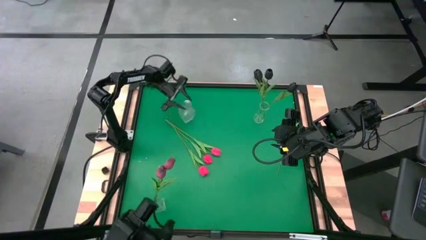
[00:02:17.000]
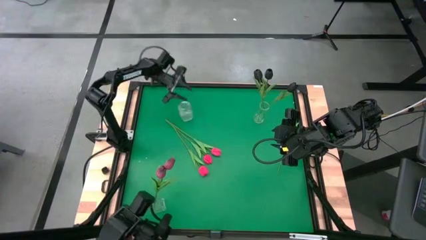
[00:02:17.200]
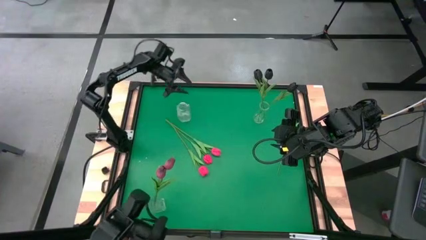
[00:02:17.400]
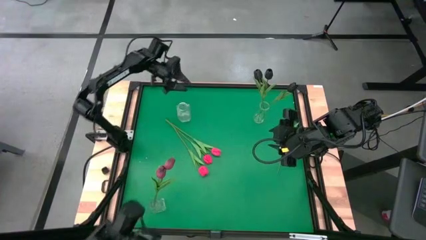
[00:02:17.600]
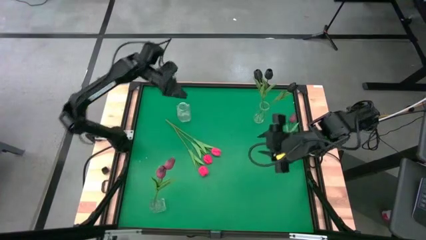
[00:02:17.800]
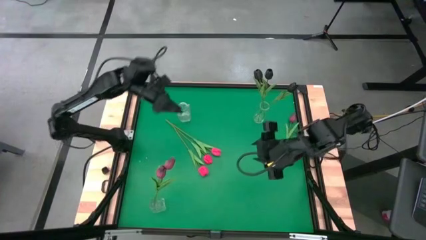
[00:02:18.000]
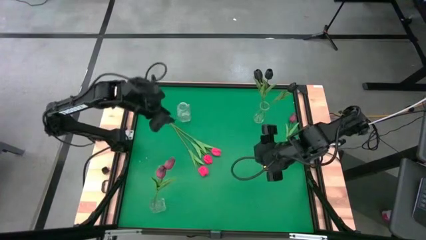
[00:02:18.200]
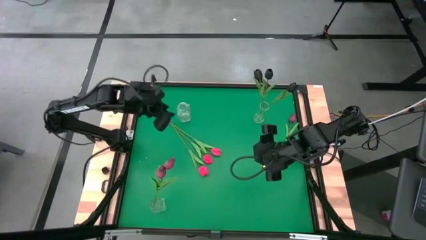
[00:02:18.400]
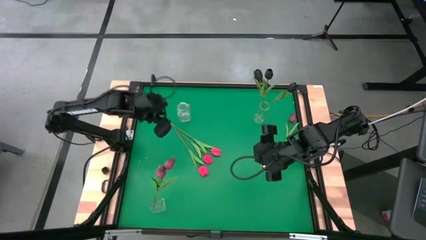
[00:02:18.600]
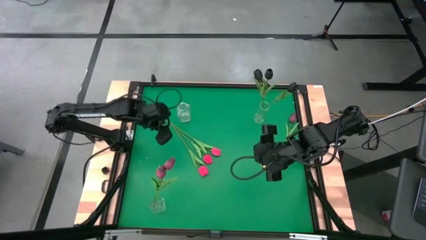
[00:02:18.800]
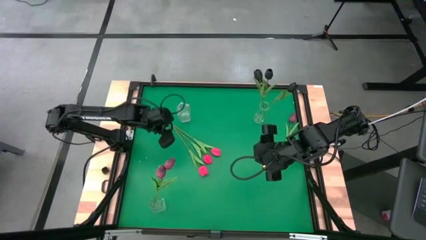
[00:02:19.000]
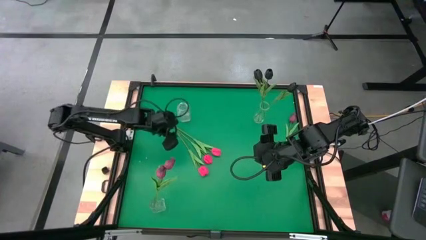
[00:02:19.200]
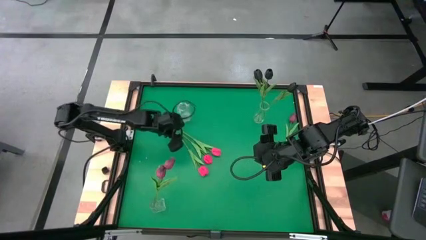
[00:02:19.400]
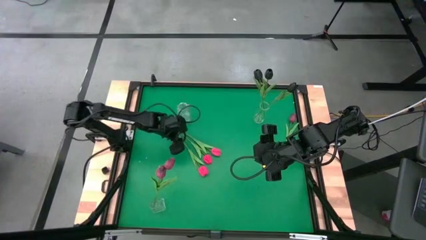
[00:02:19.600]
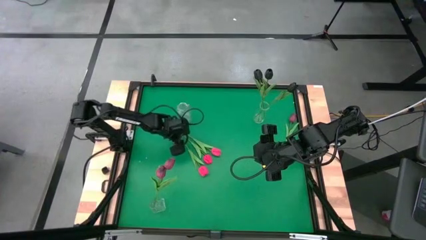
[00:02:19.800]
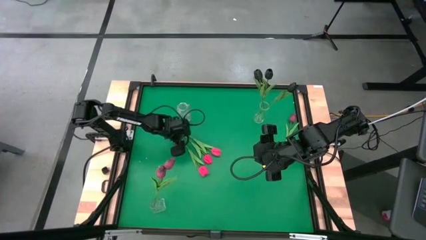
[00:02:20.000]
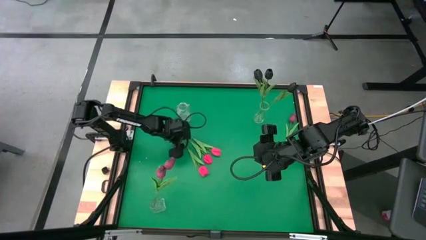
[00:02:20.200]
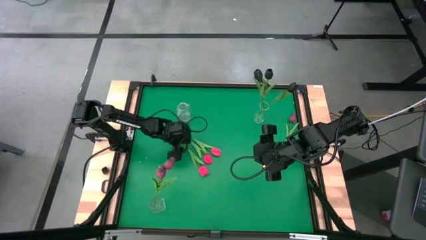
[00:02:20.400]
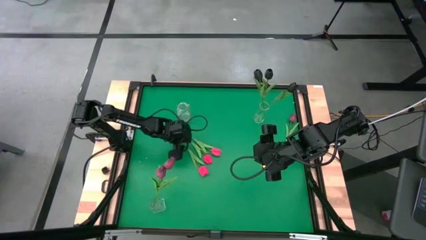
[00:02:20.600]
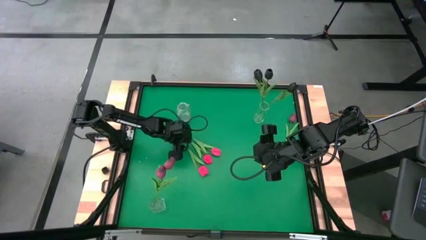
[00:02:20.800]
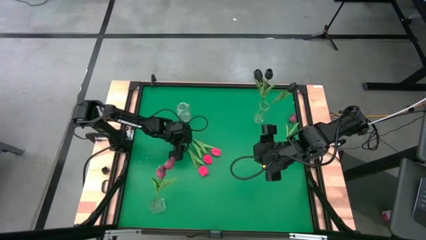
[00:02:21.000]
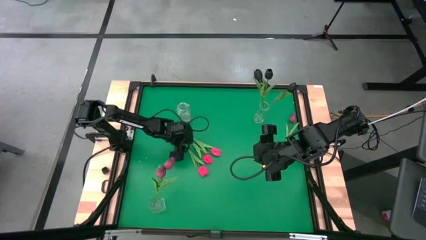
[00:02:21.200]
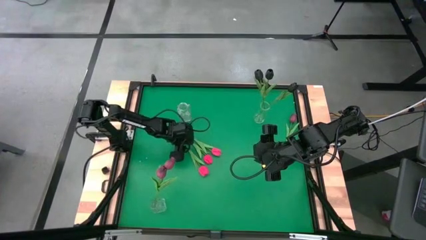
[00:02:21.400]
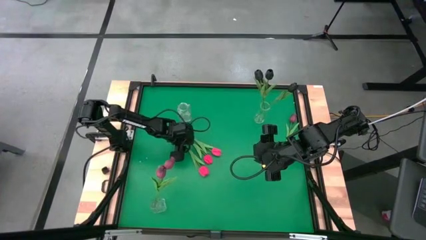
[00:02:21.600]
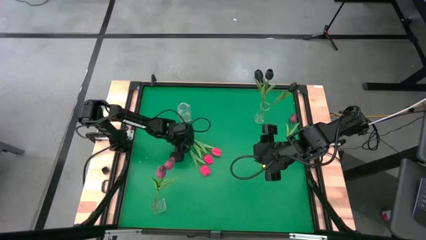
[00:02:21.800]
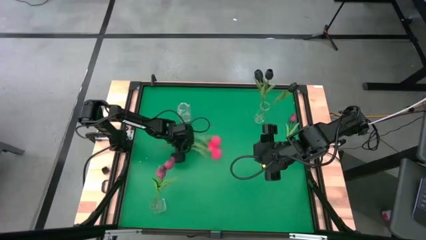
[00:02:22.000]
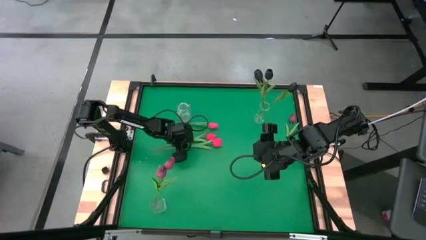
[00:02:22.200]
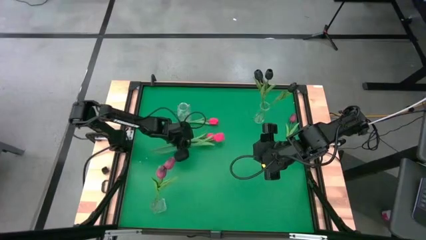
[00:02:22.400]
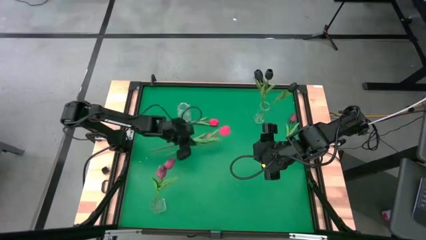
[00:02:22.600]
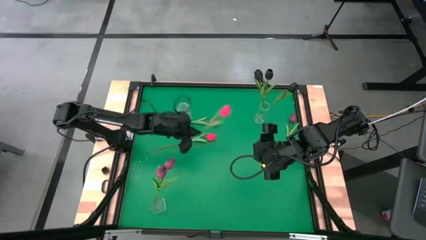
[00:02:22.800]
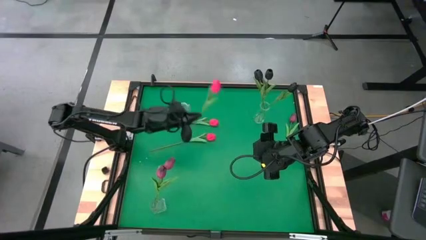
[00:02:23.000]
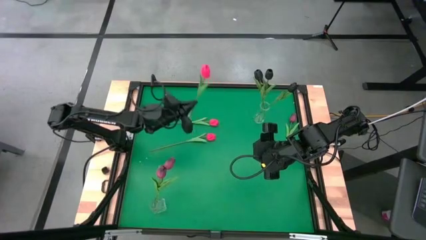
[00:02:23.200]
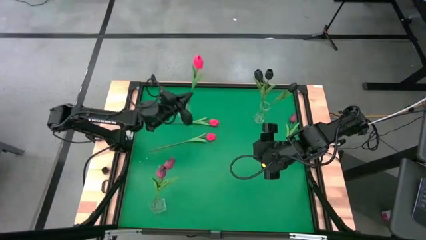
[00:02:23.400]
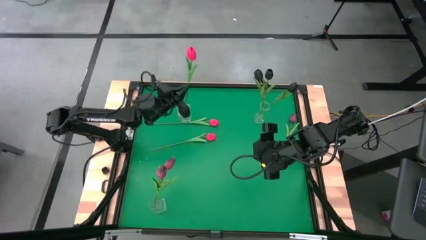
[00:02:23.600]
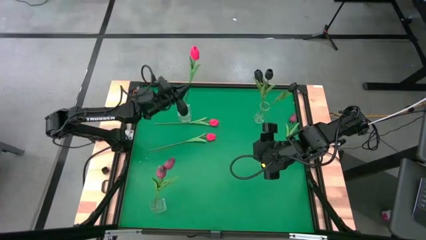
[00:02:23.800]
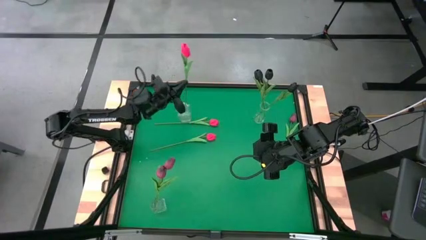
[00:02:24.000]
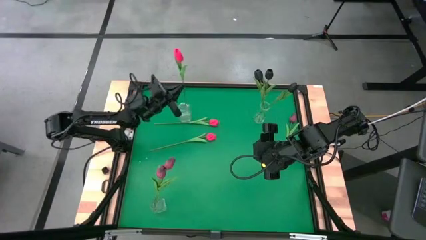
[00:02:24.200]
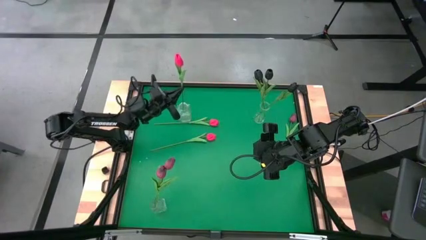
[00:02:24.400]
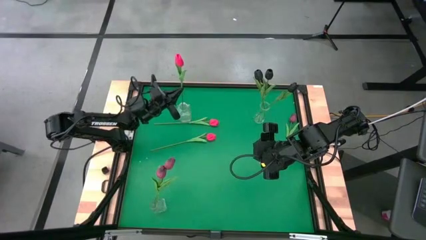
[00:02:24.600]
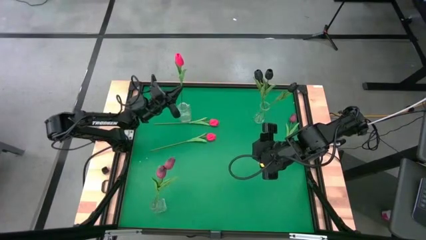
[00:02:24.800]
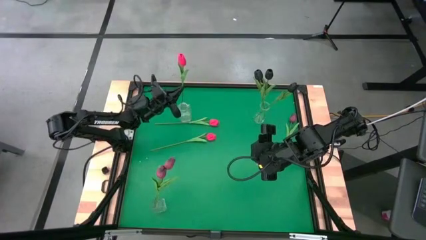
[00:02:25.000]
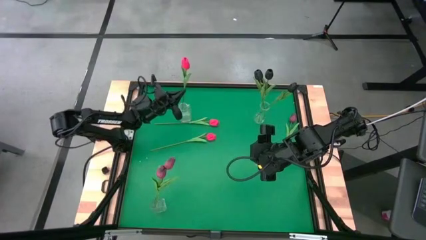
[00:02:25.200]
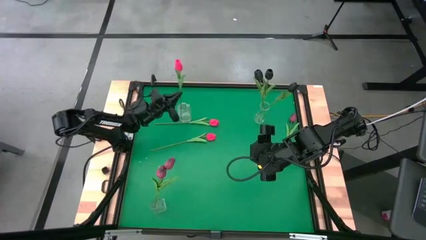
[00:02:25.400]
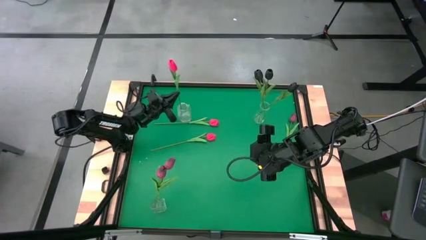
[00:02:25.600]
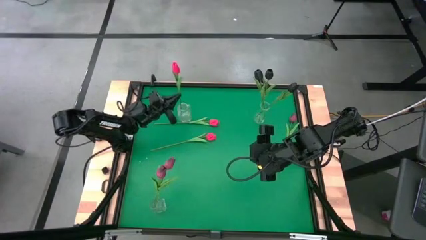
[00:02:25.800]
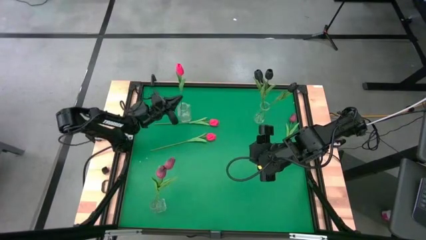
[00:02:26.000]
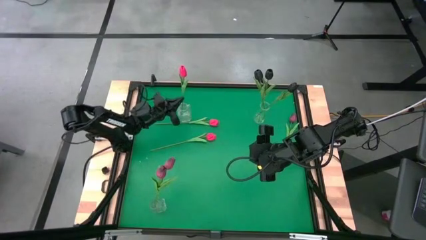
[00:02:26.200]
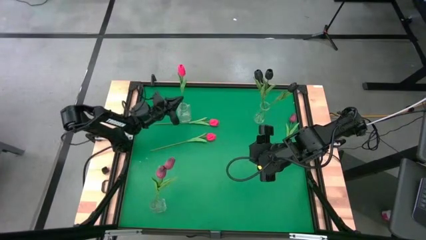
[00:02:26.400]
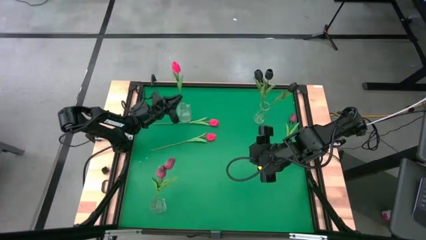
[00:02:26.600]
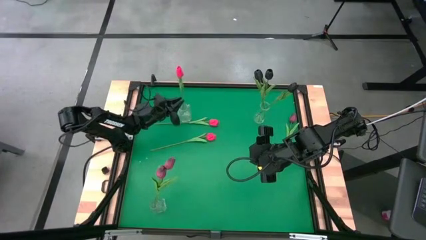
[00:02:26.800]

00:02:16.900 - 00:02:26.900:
Task: Sort flowers into vase by color
Put the bottom pink flower into the top left transparent vase
